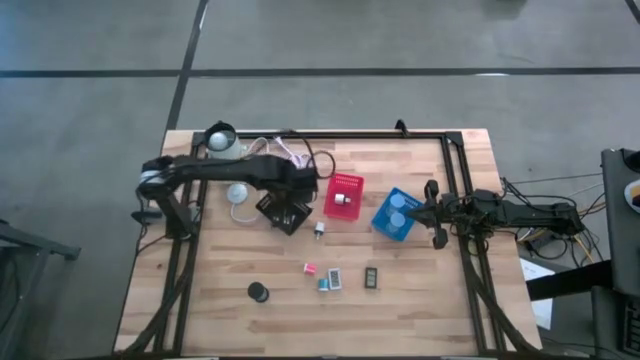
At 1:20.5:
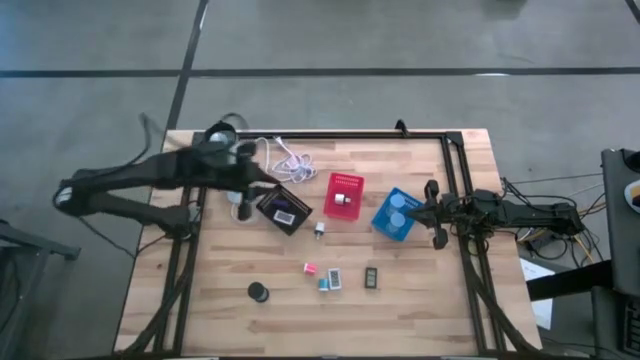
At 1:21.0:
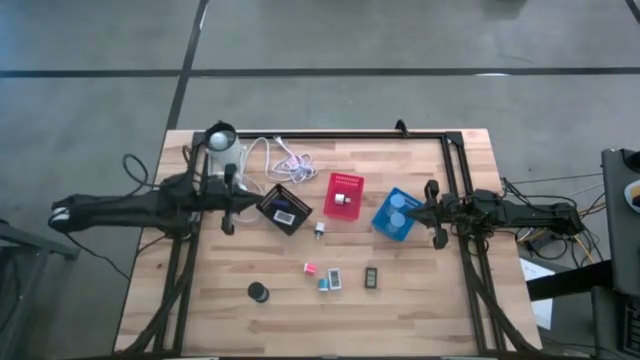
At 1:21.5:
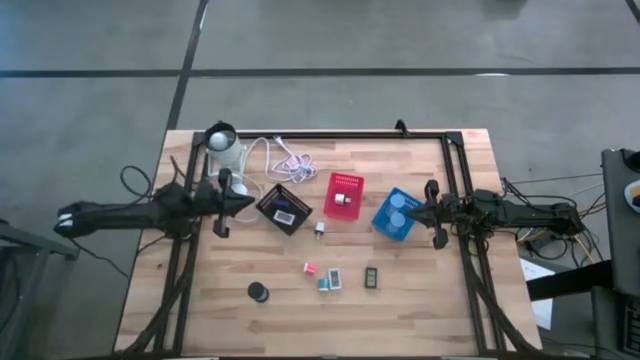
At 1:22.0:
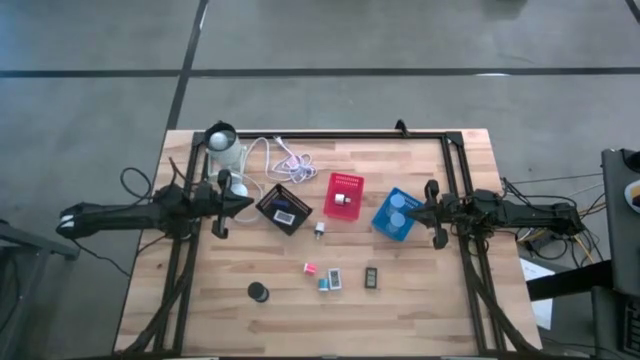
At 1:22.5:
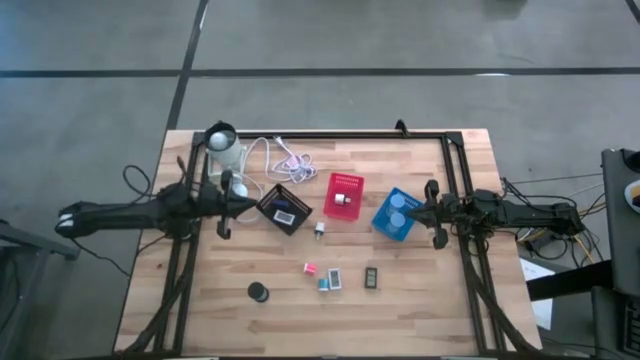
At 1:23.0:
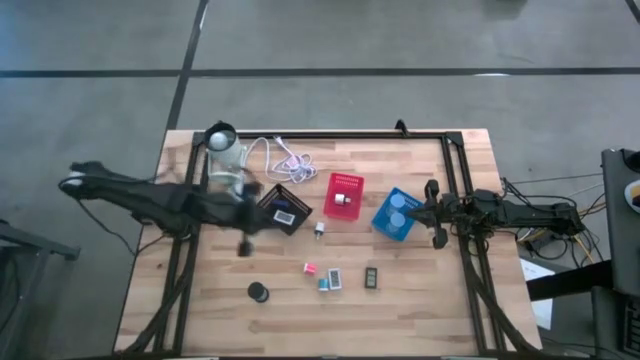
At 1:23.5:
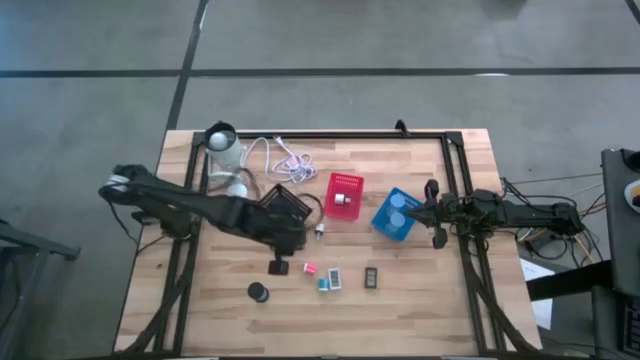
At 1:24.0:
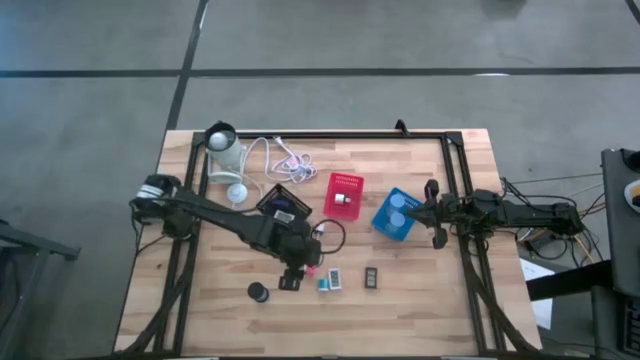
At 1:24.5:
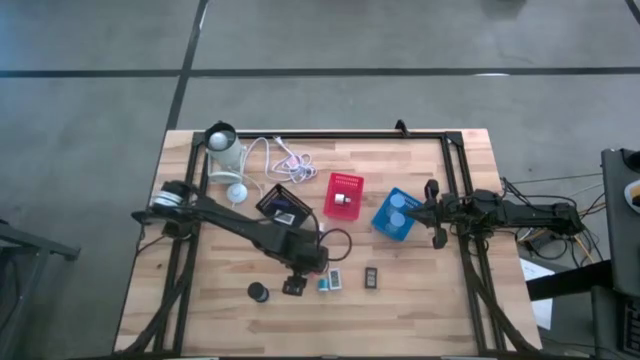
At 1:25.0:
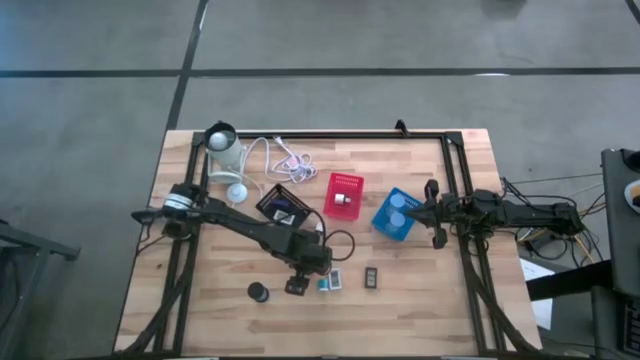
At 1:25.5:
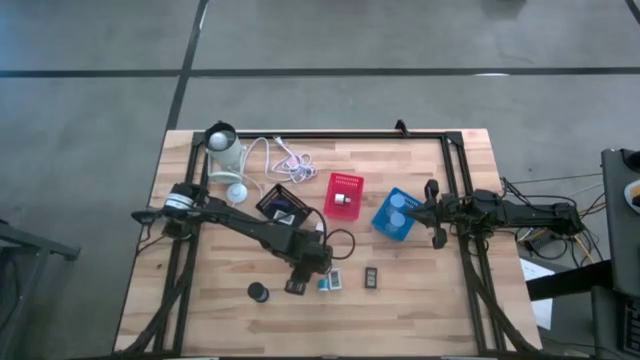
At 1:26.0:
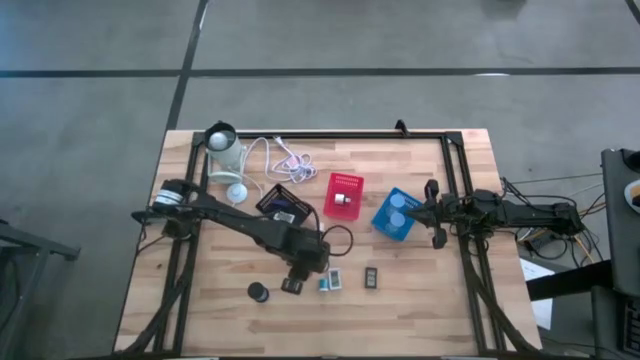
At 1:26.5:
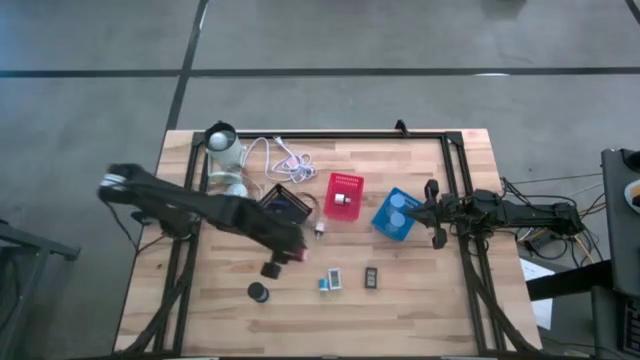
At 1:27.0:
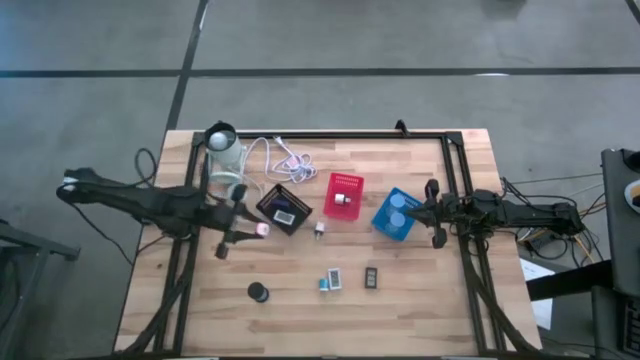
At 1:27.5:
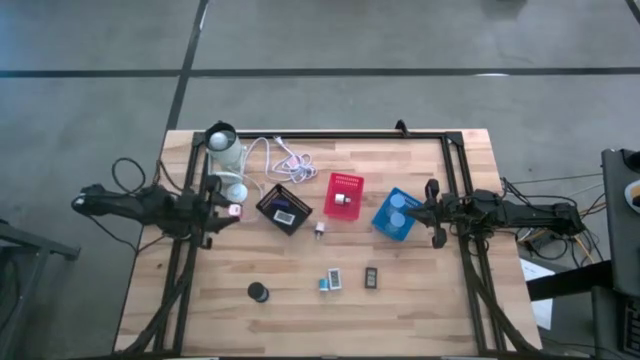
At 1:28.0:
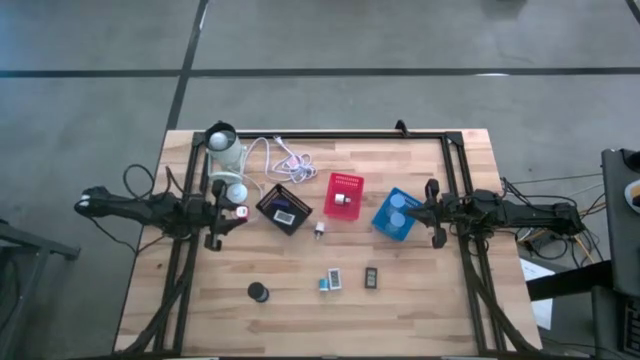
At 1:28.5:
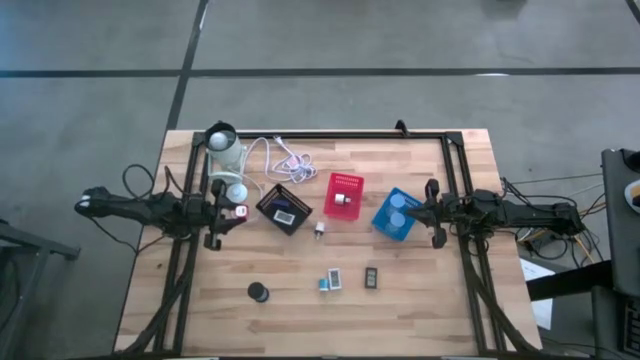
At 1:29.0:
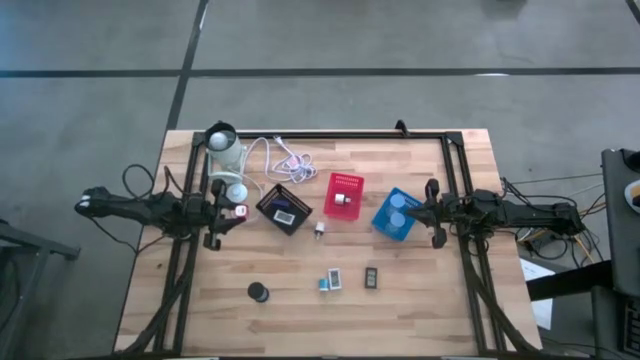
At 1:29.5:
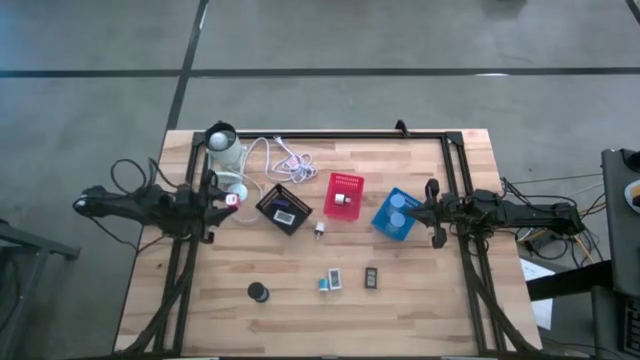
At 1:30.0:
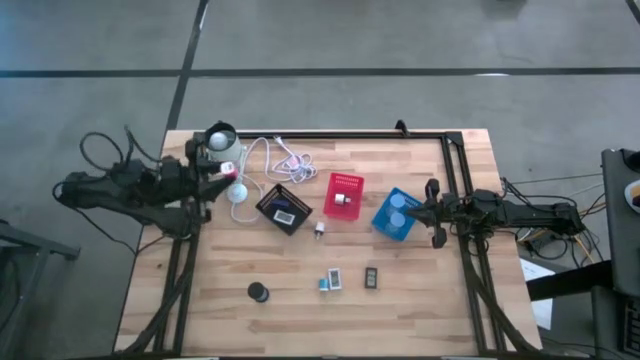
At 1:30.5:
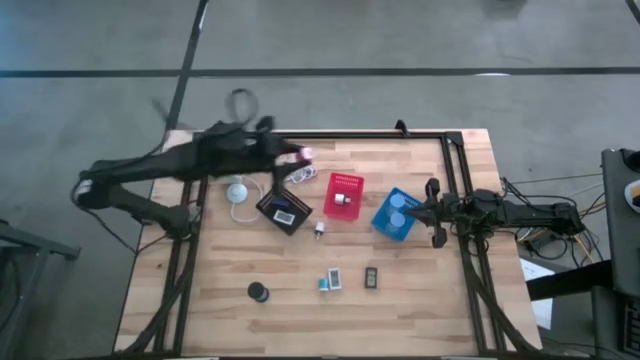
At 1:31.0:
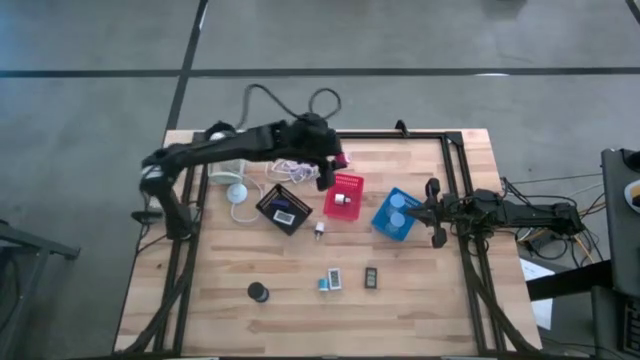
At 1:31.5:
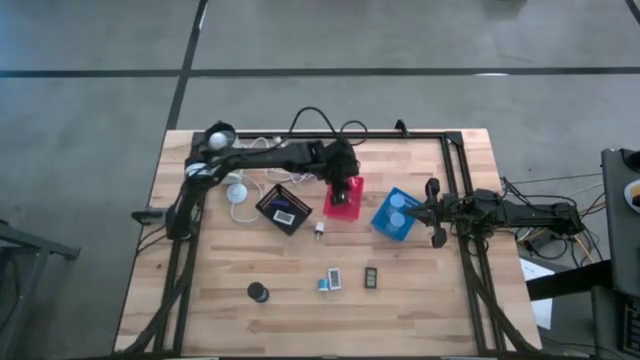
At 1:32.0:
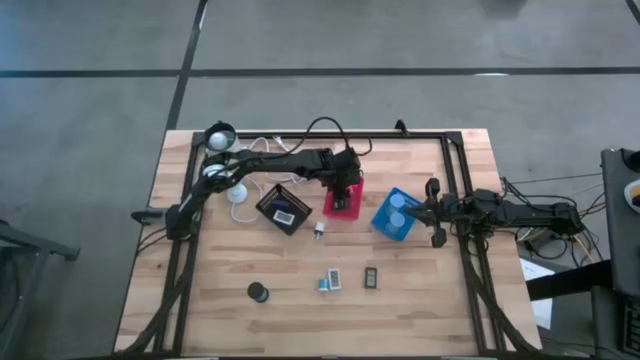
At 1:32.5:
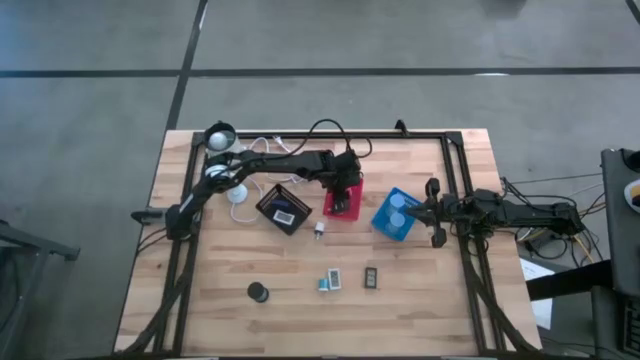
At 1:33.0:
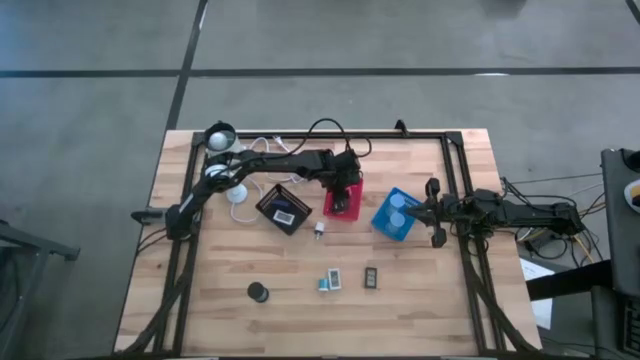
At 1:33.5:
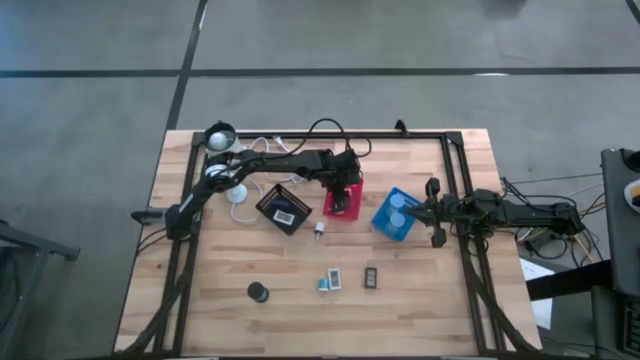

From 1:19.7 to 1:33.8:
Task: Pick & Place Office items
Put the pink charger adapter into the red basket

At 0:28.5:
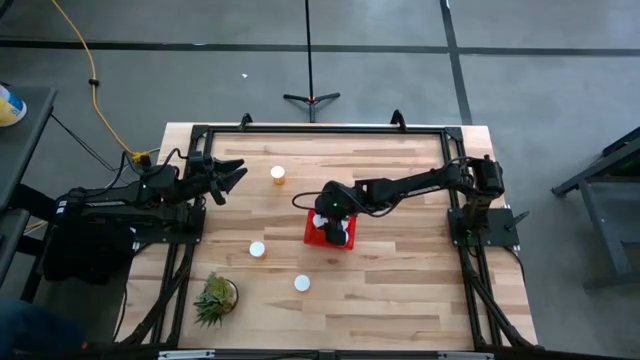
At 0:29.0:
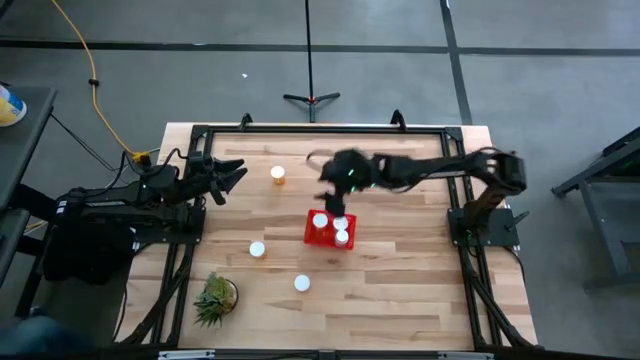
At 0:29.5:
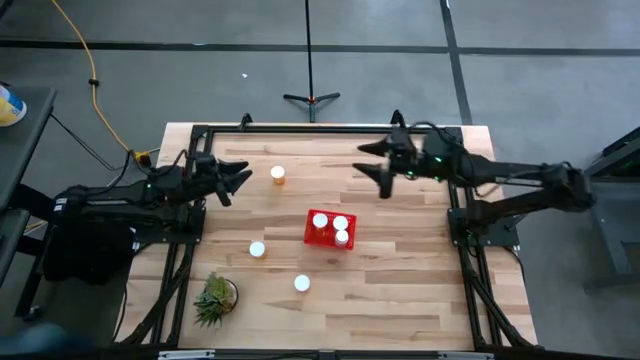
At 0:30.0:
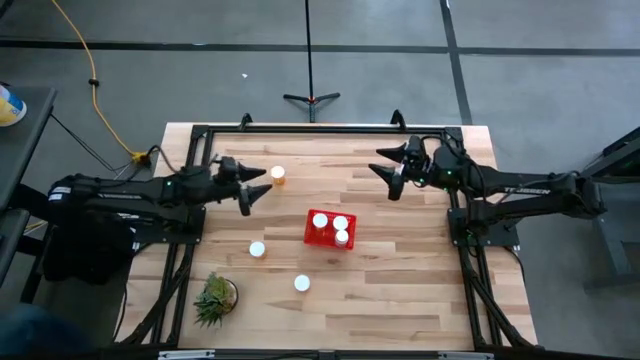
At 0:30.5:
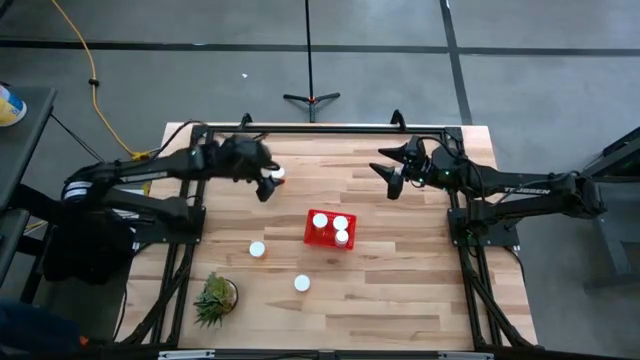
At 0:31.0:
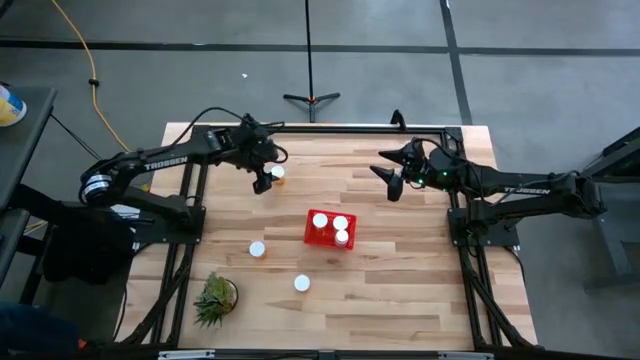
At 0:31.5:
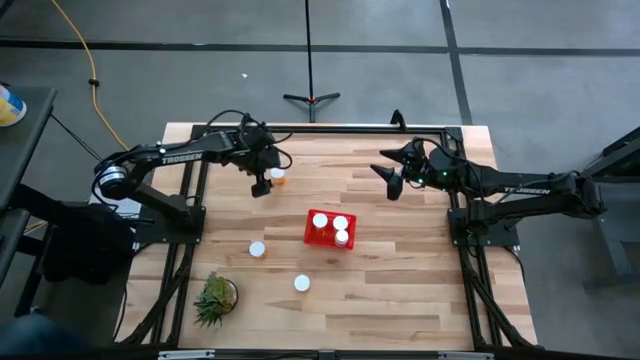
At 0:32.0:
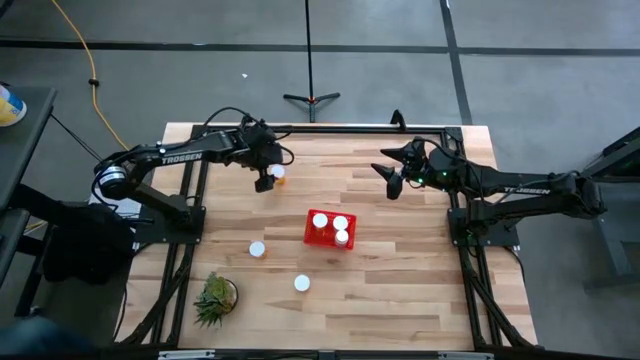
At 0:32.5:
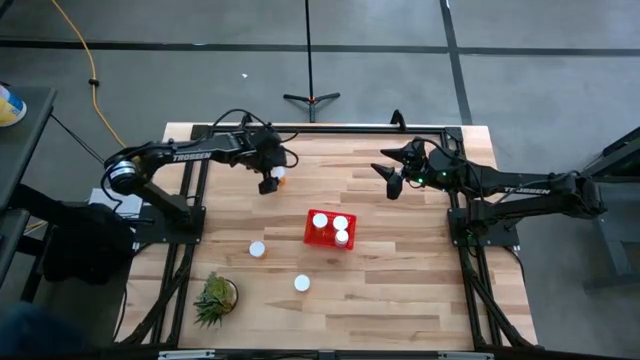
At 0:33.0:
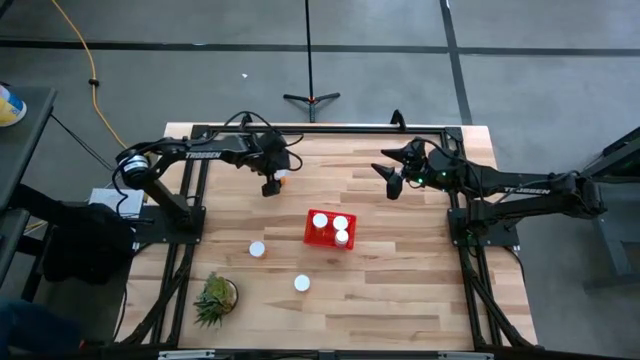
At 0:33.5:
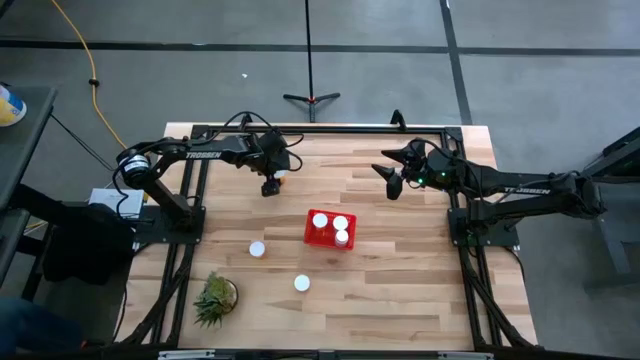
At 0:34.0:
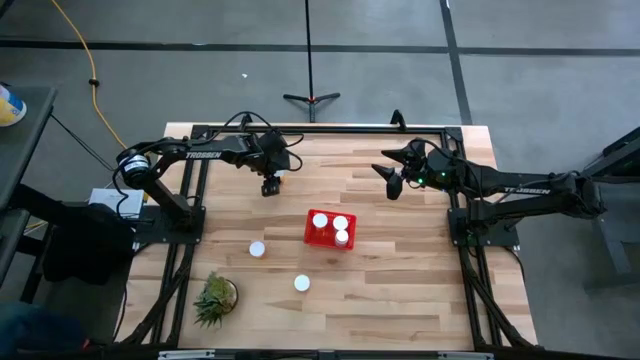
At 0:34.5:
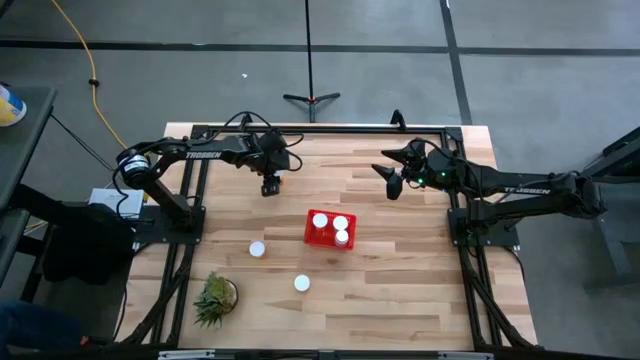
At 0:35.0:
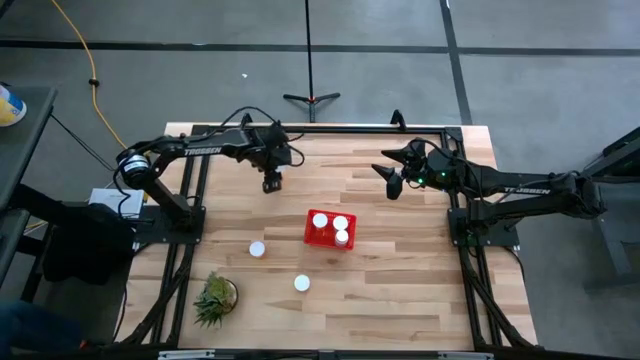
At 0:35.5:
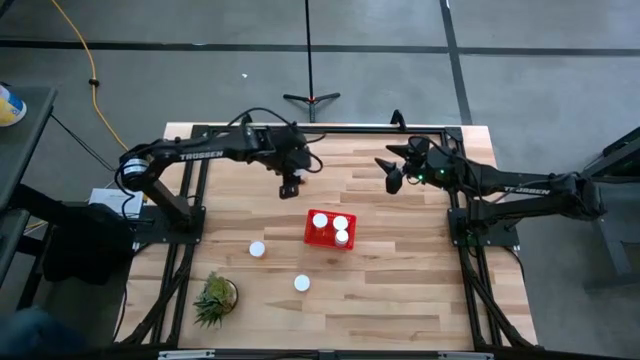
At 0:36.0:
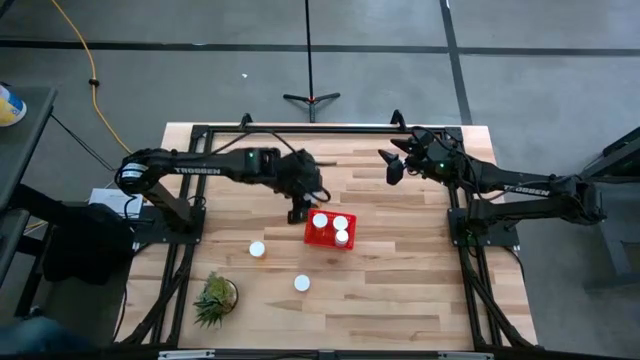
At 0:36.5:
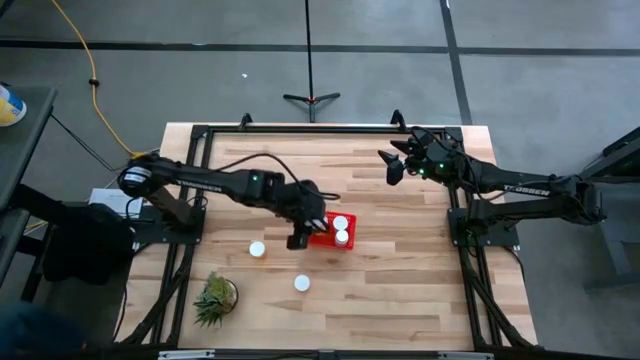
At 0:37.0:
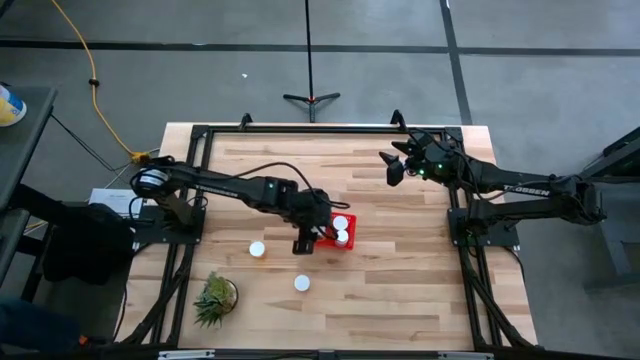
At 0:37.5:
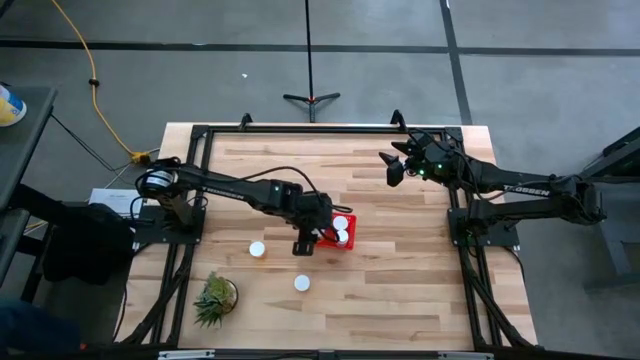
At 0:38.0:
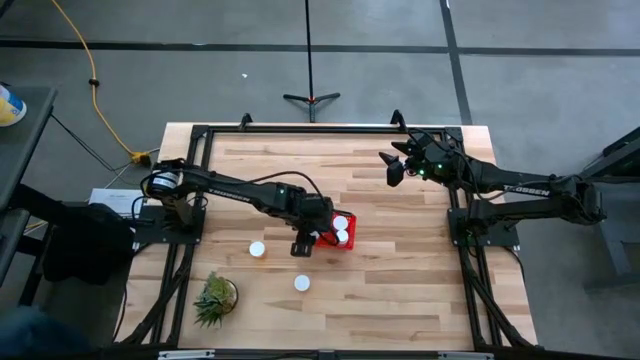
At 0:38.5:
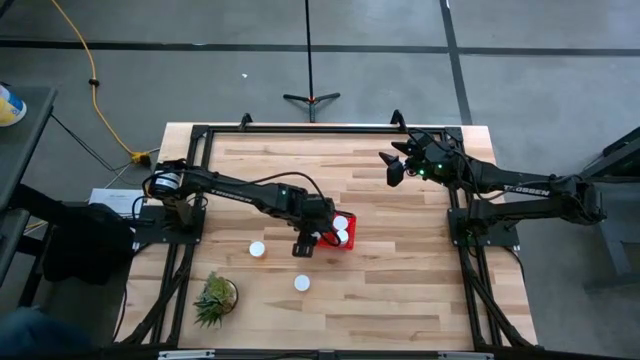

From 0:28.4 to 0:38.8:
Task: Pick and place pill bottles into a basket
Put the top orange pill bottle into the red bin
